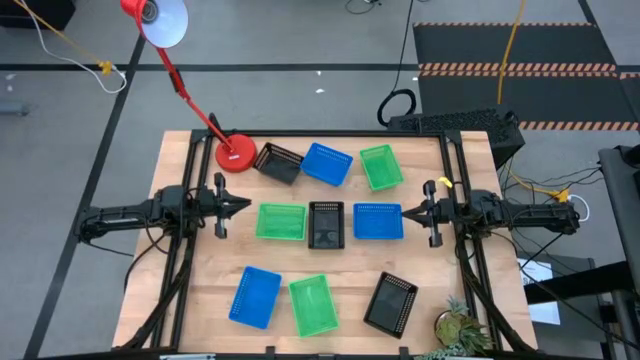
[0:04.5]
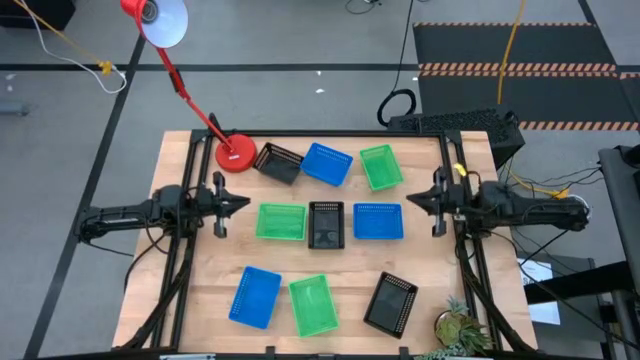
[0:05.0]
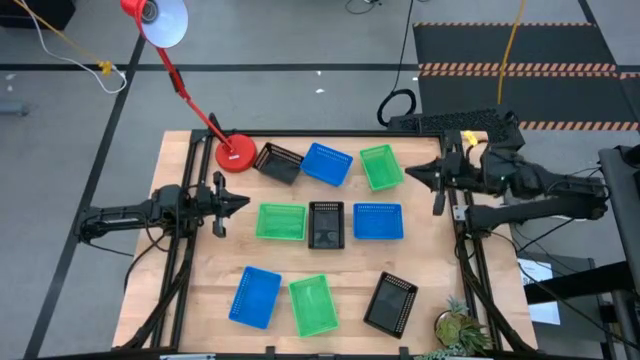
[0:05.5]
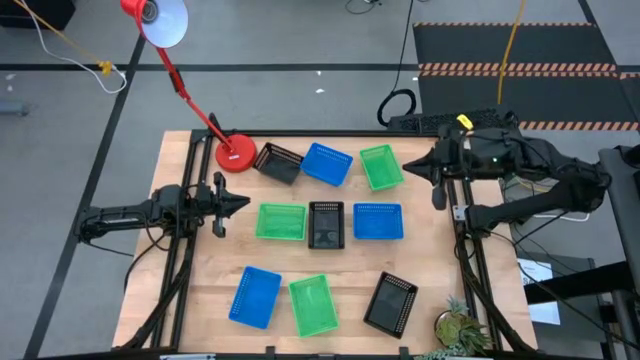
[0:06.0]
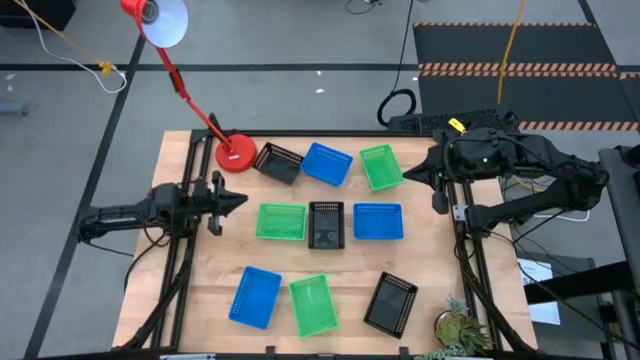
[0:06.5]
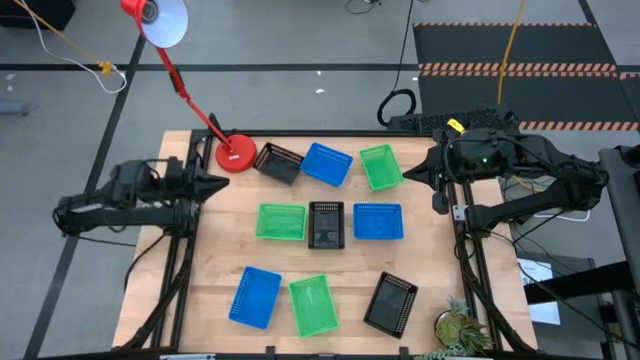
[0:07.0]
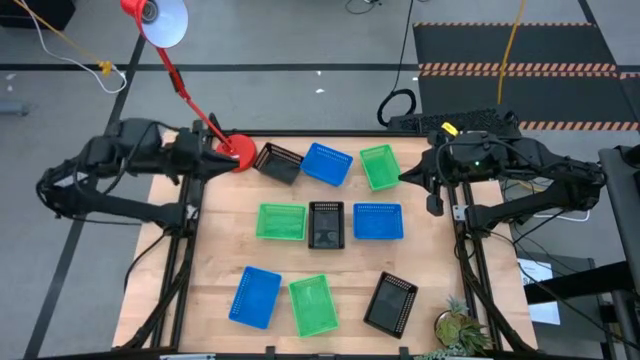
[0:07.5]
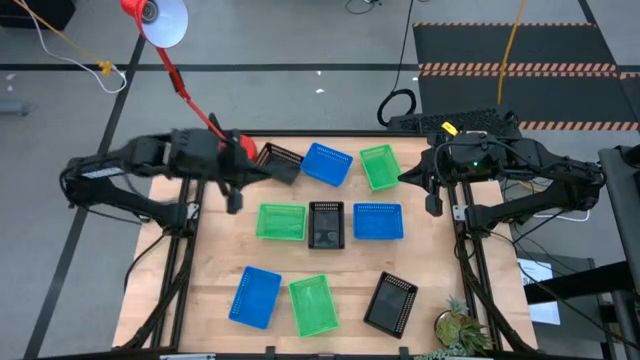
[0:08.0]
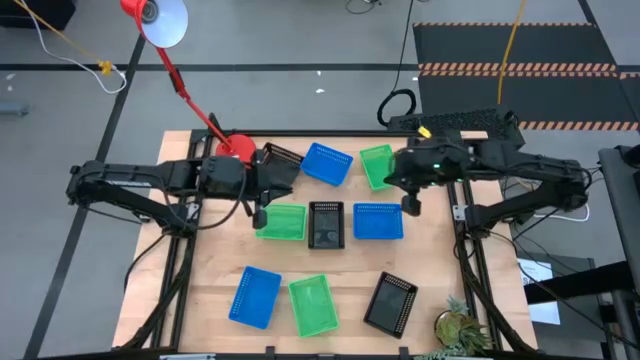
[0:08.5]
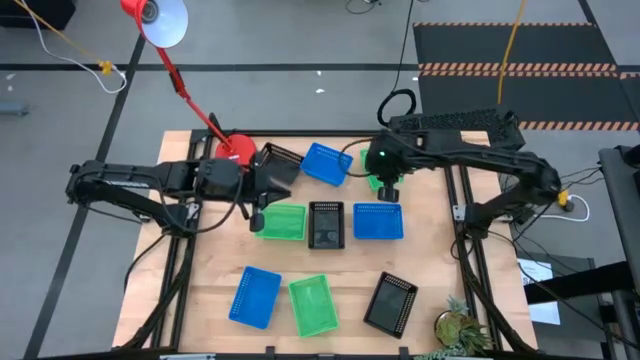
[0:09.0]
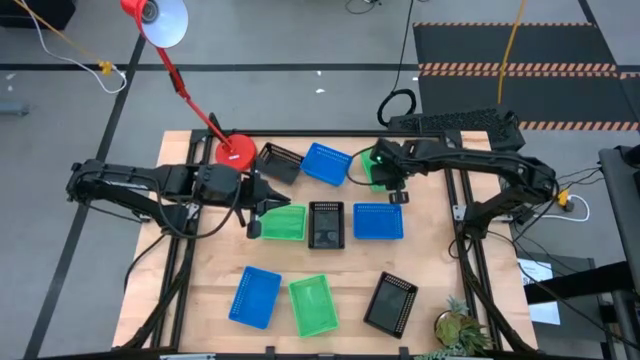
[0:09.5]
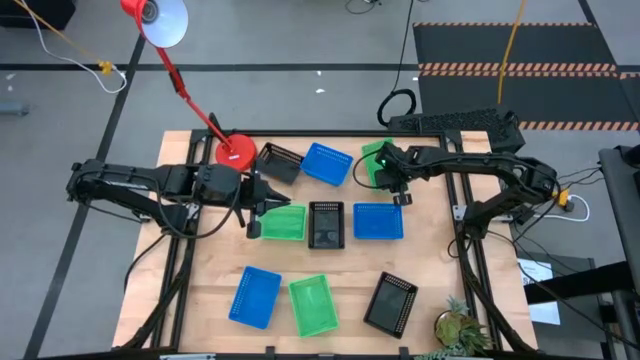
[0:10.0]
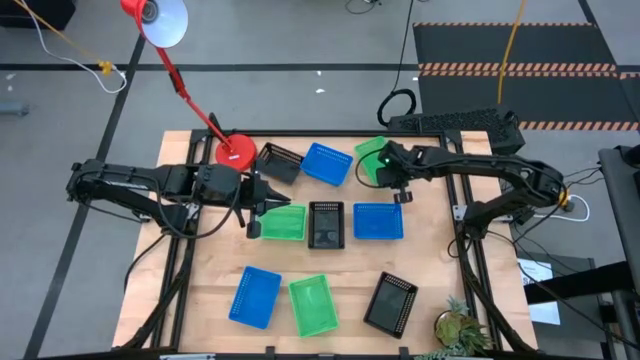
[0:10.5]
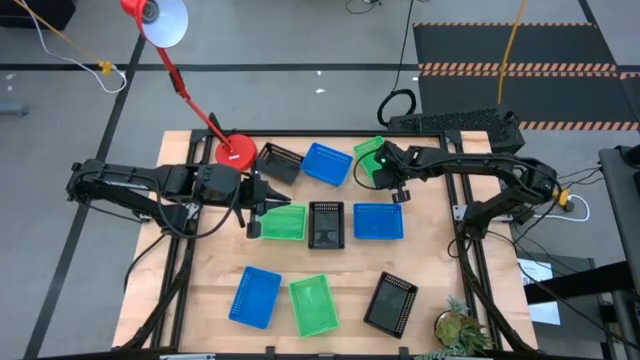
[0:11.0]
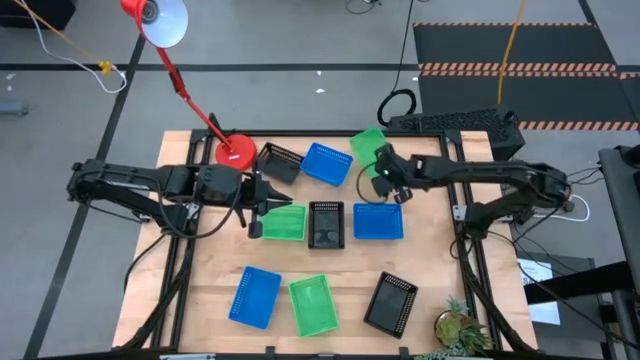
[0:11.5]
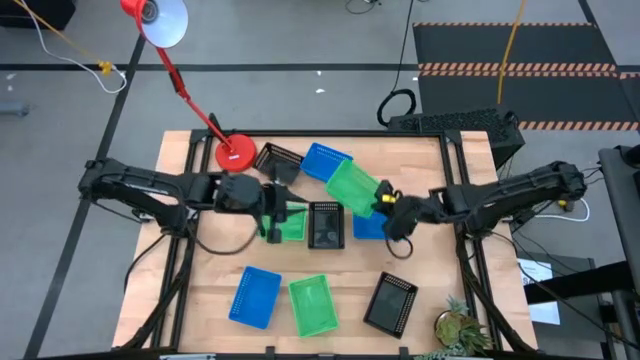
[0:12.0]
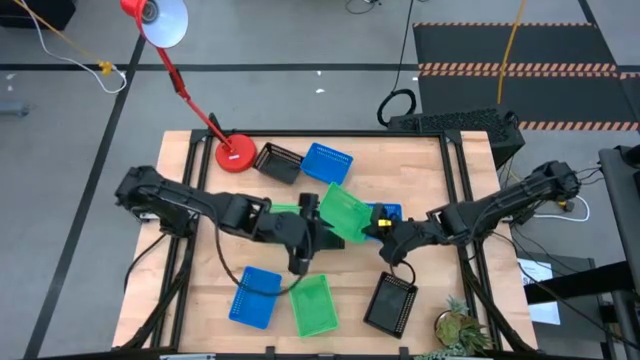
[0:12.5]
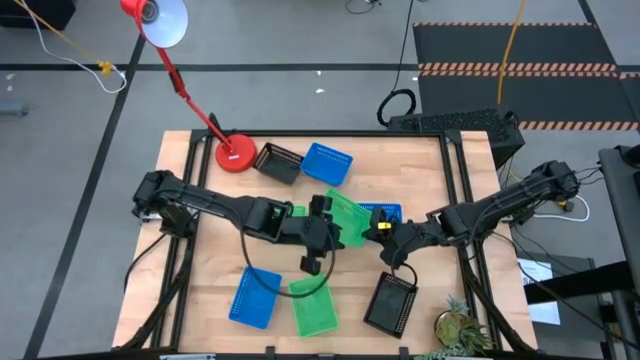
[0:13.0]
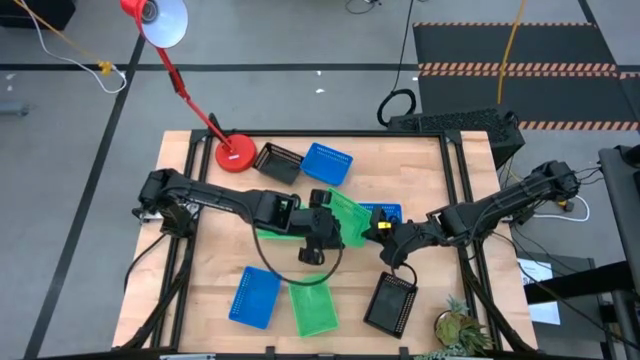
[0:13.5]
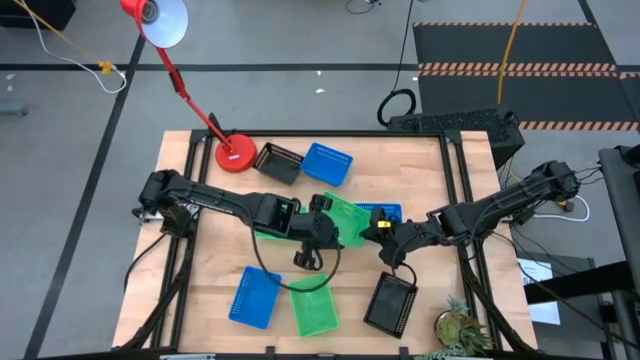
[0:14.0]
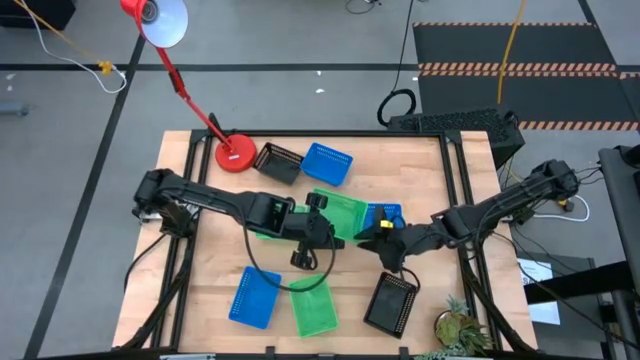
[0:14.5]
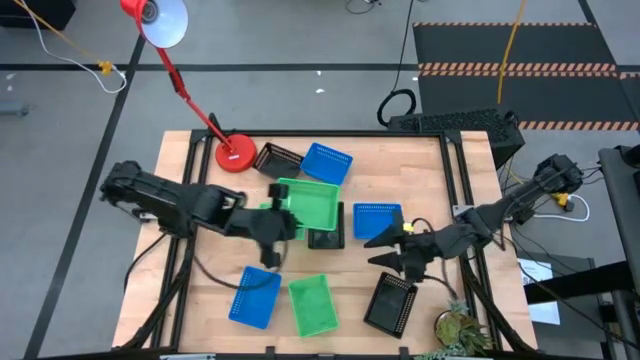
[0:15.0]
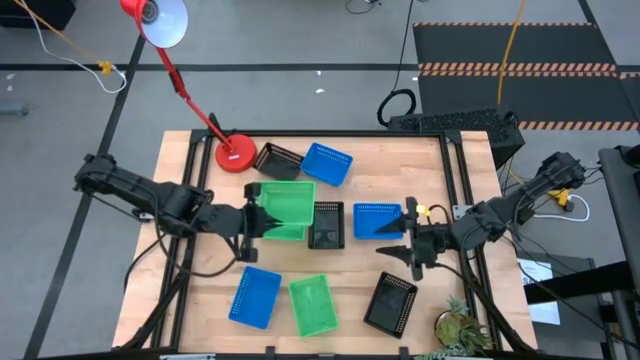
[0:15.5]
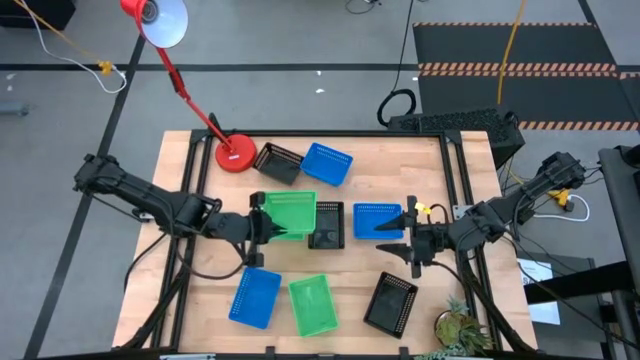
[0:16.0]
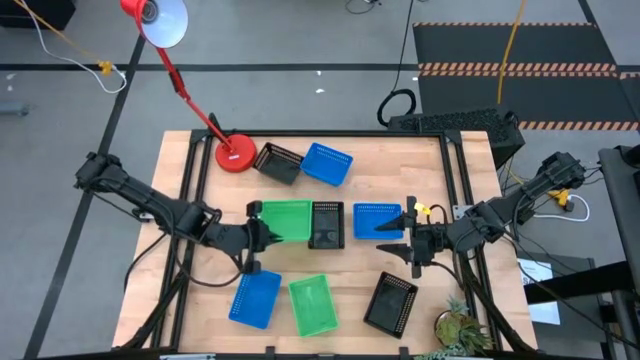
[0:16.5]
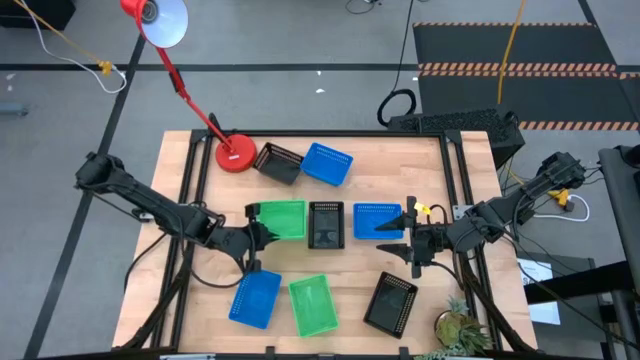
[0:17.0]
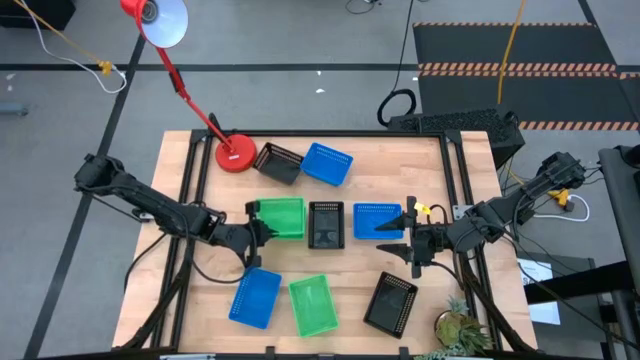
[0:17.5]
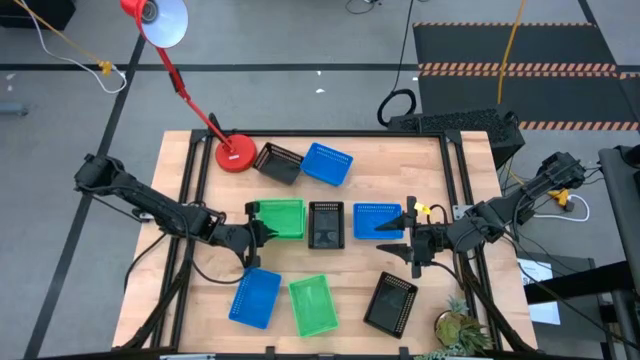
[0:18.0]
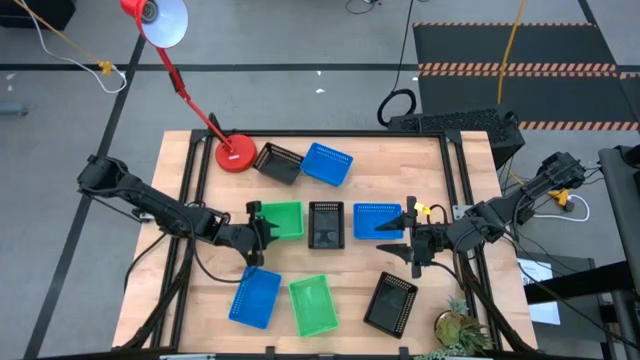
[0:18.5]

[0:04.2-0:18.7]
Stack the top green bin on the middle green bin

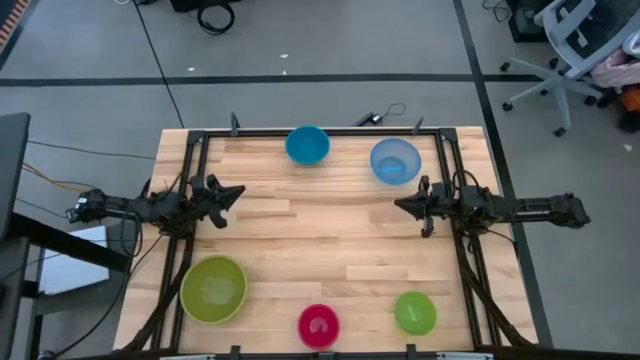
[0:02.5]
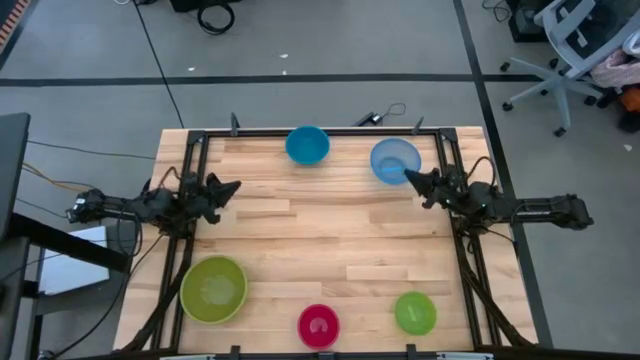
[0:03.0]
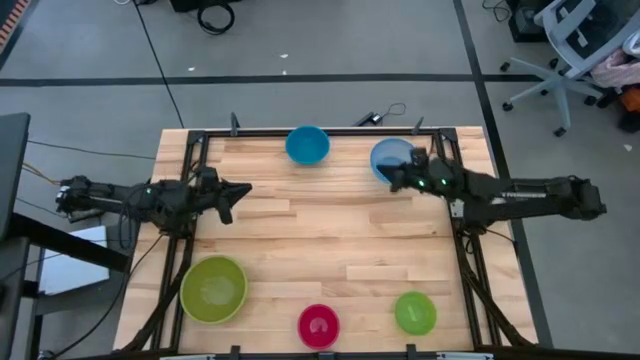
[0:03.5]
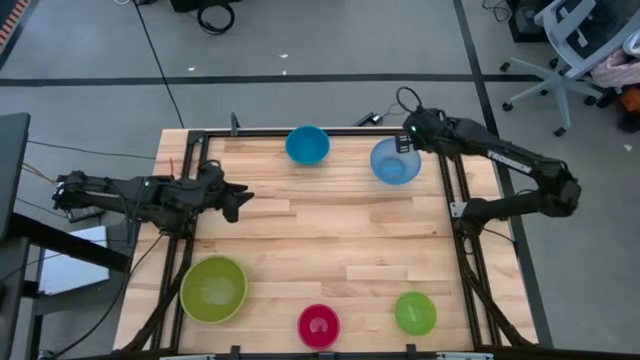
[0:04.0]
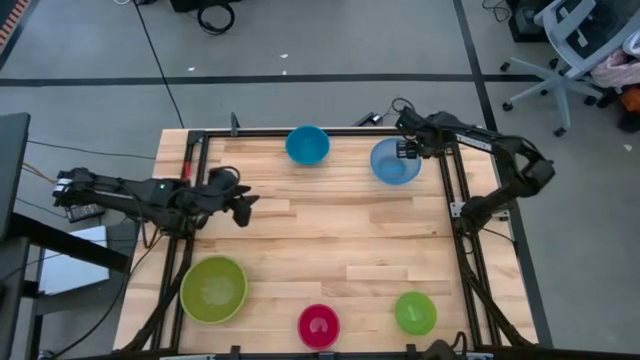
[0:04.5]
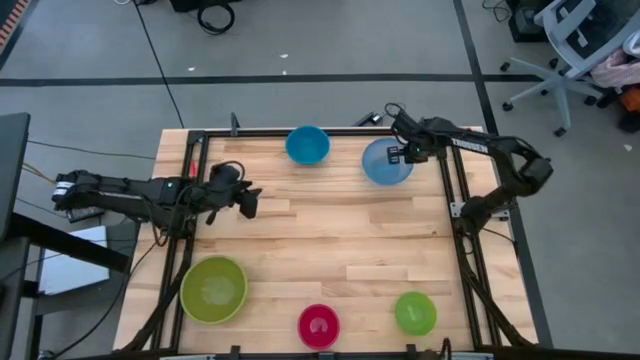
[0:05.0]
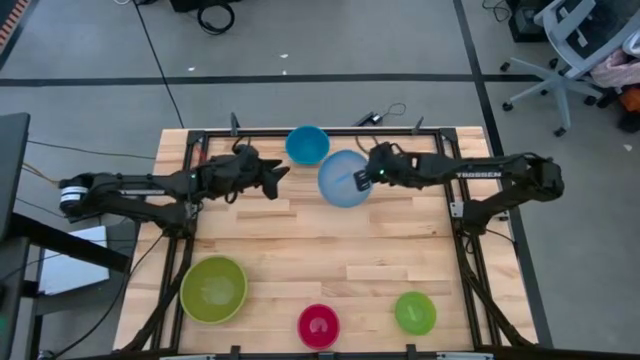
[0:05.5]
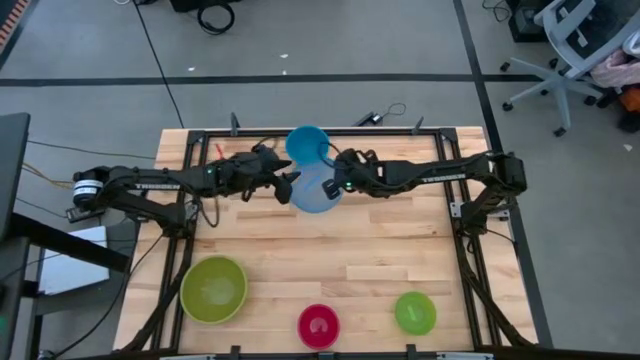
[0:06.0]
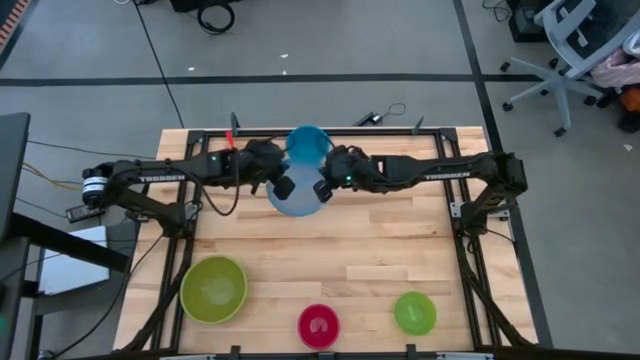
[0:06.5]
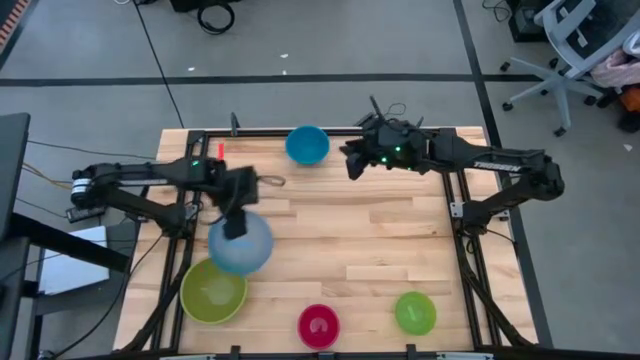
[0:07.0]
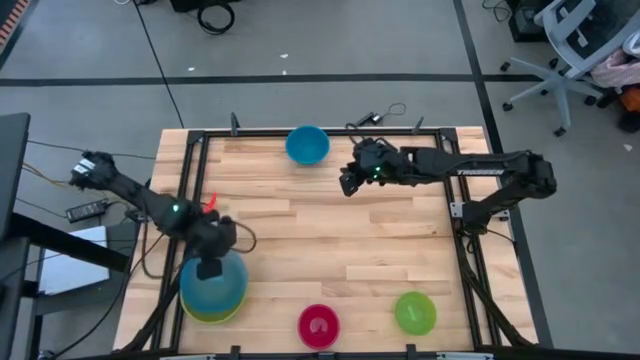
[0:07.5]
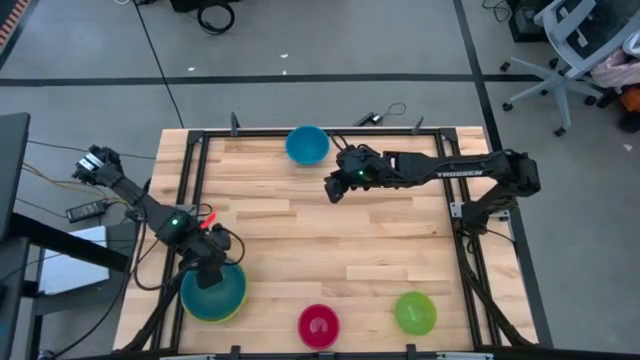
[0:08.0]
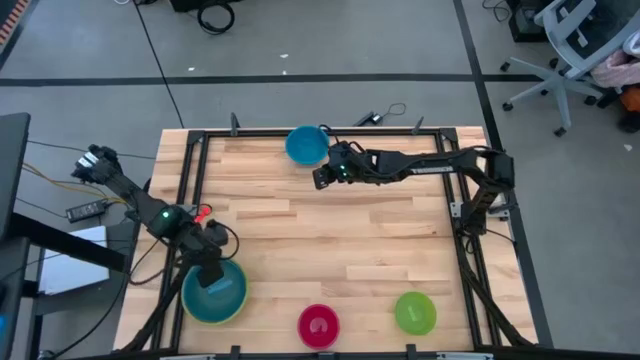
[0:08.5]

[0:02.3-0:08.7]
Stack the right blue bowl on top of the green bowl

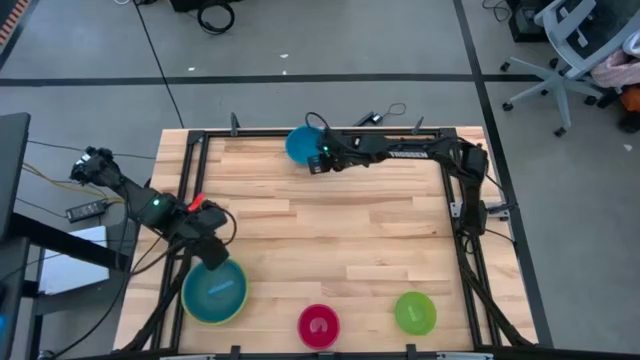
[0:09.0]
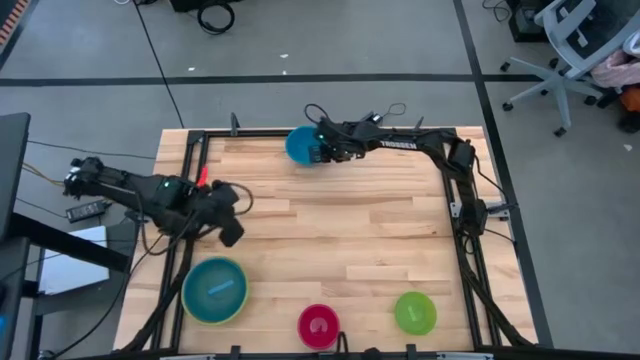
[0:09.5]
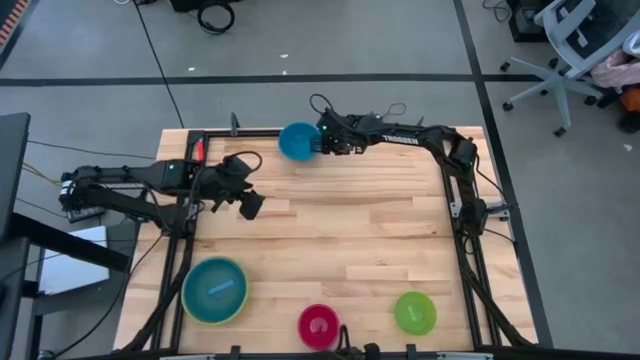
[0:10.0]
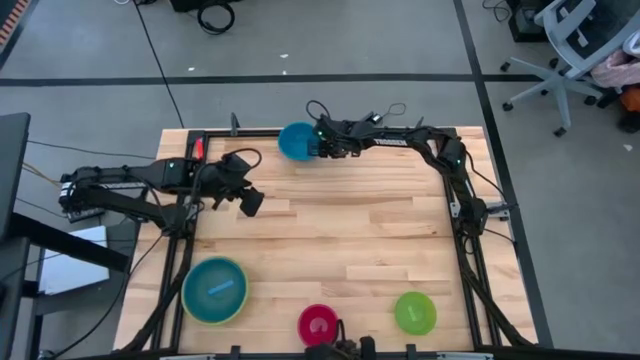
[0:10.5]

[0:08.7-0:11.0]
Stack the small blue bowl on top of the big blue bowl
